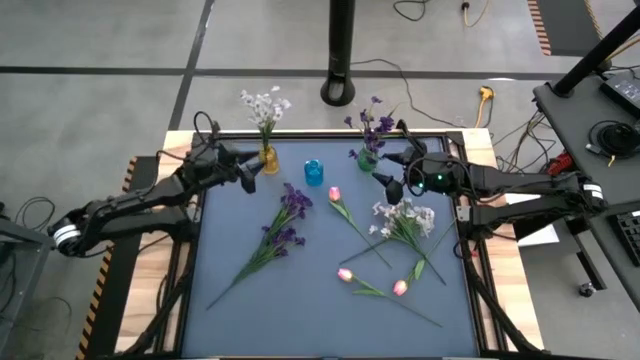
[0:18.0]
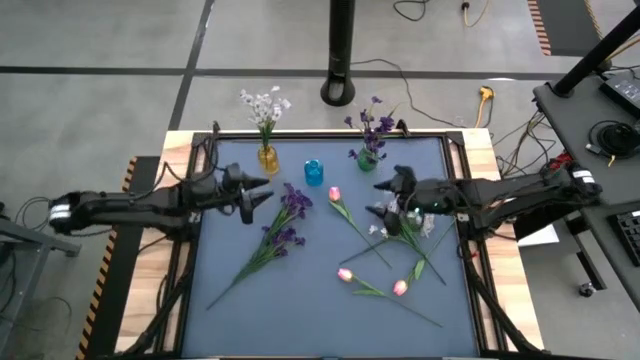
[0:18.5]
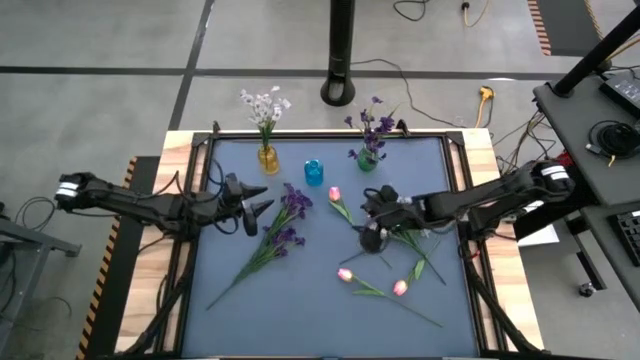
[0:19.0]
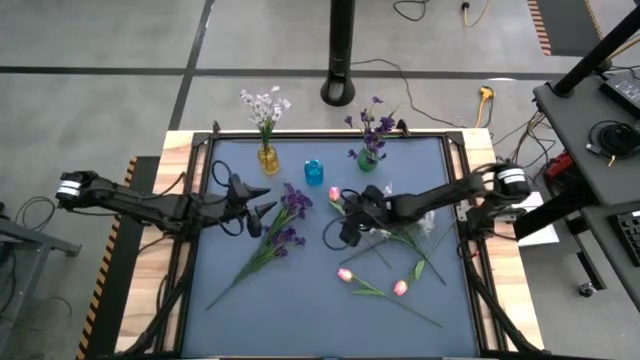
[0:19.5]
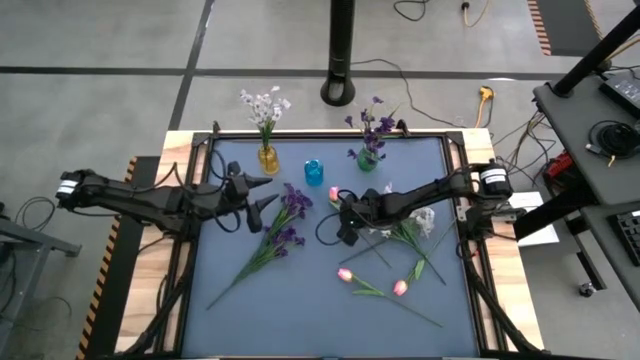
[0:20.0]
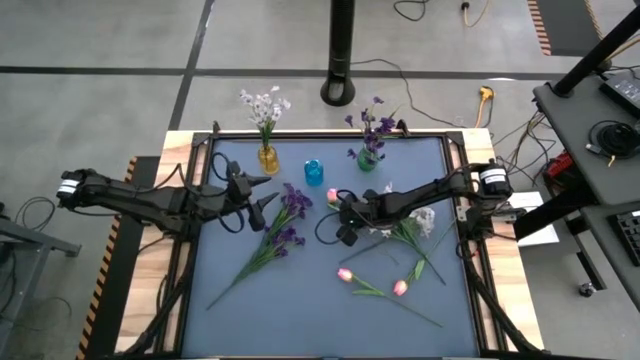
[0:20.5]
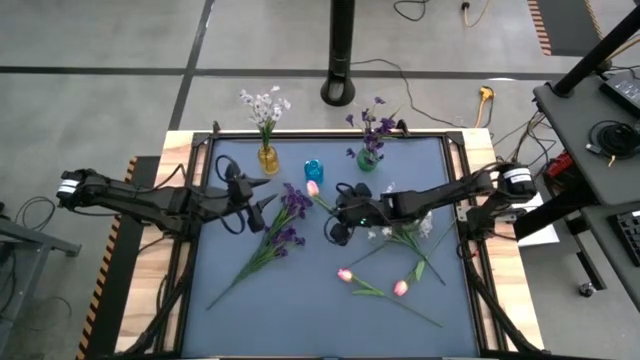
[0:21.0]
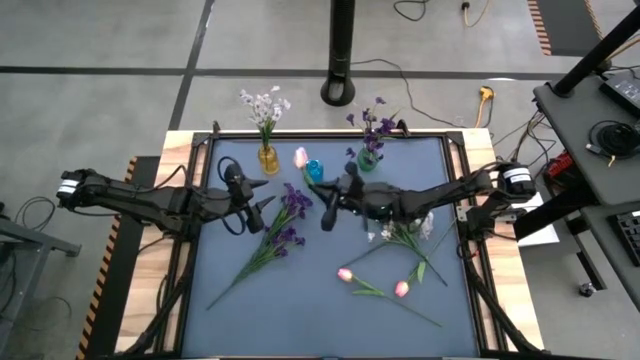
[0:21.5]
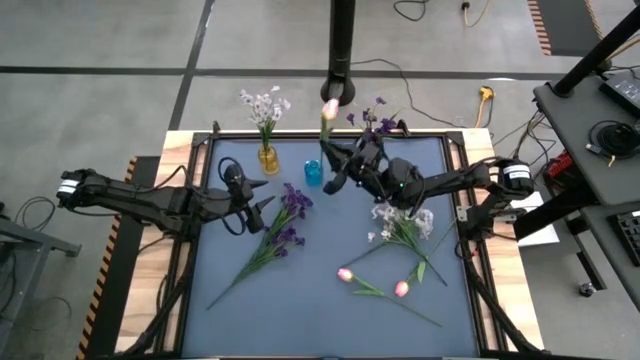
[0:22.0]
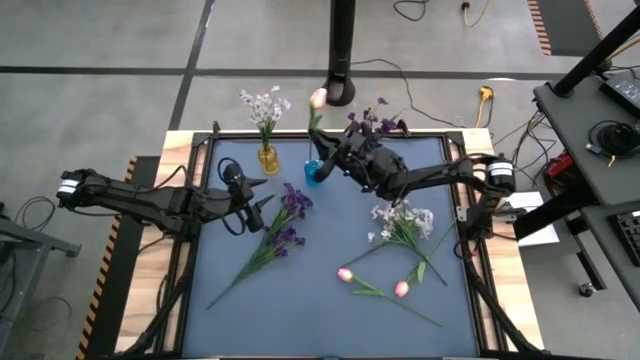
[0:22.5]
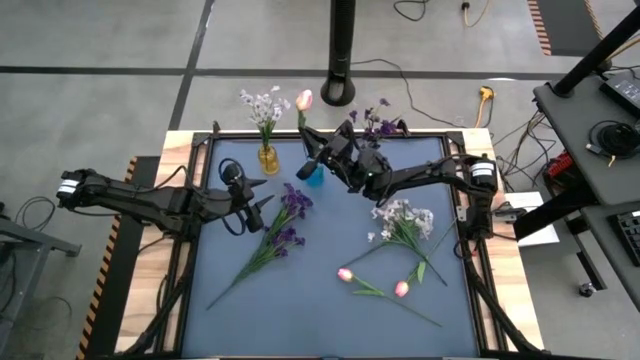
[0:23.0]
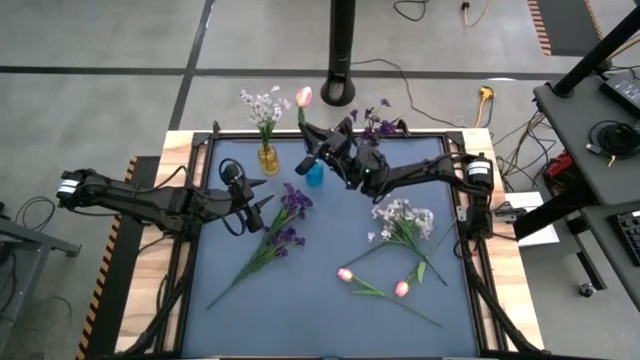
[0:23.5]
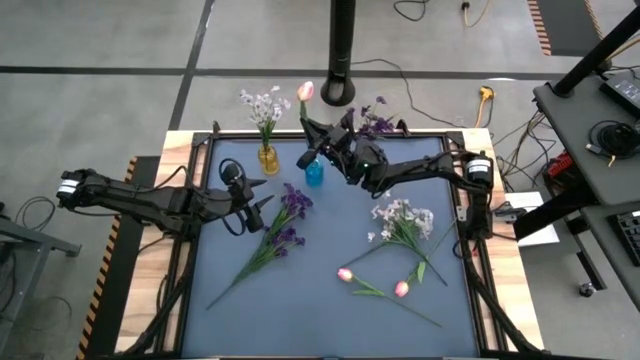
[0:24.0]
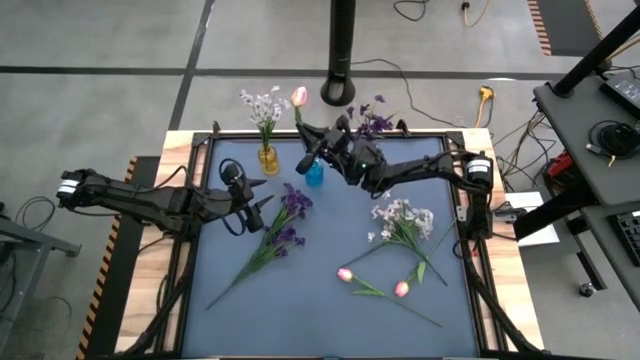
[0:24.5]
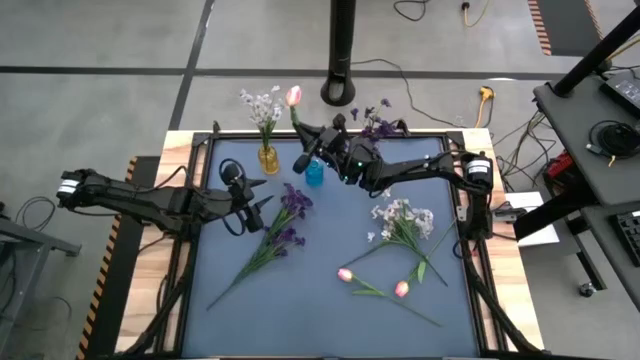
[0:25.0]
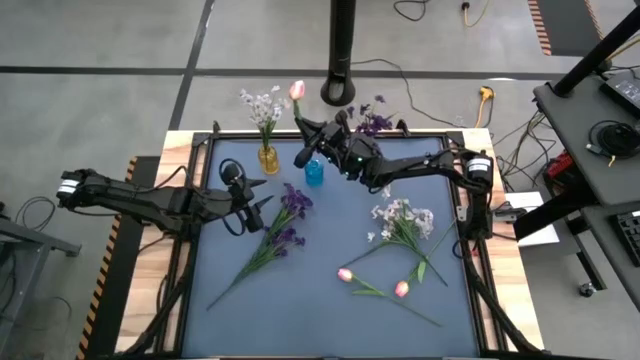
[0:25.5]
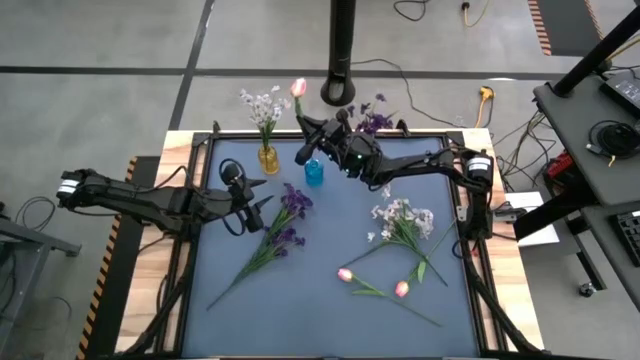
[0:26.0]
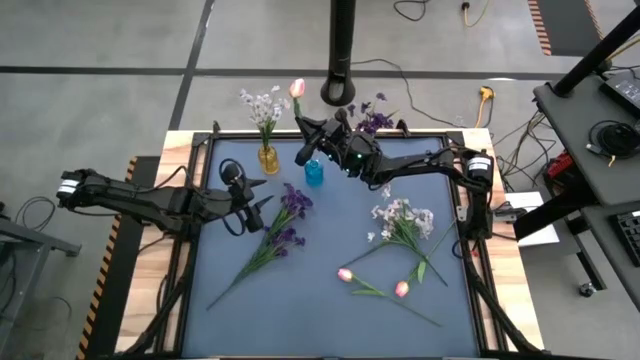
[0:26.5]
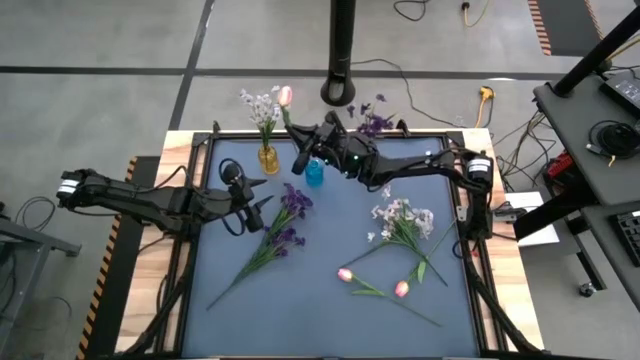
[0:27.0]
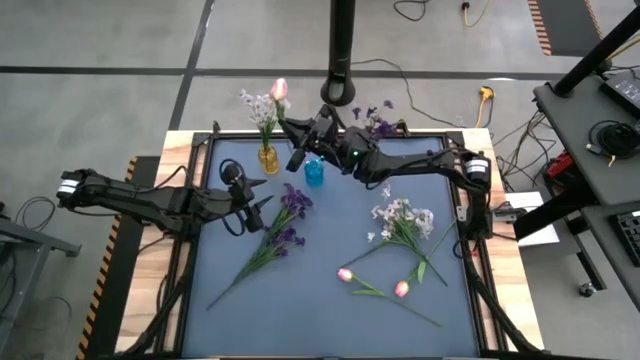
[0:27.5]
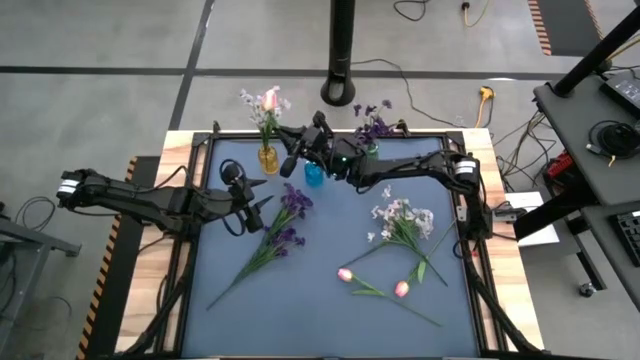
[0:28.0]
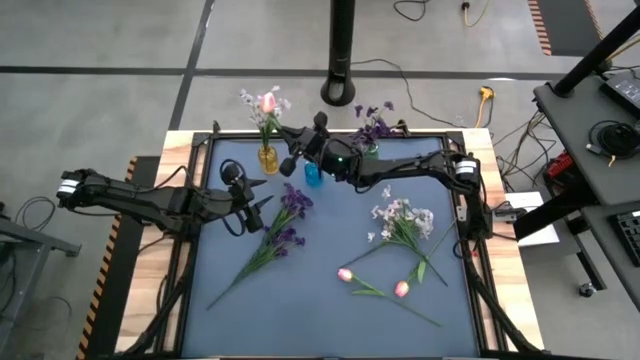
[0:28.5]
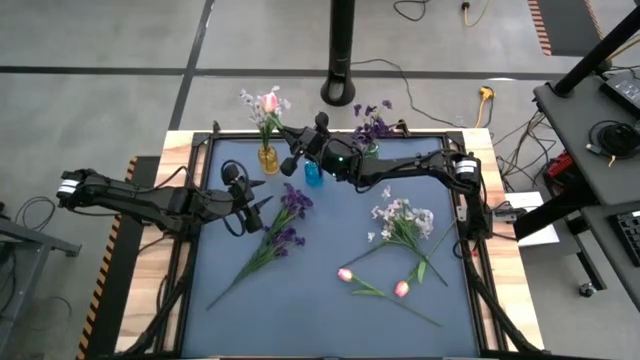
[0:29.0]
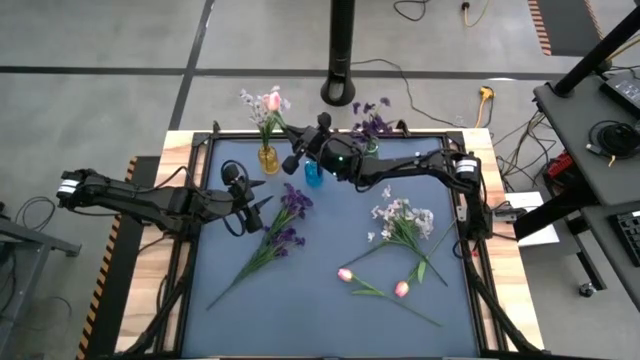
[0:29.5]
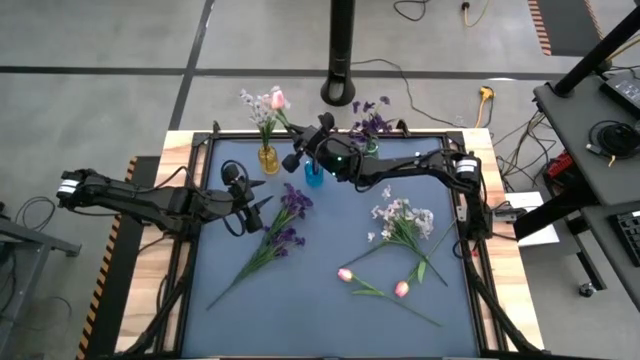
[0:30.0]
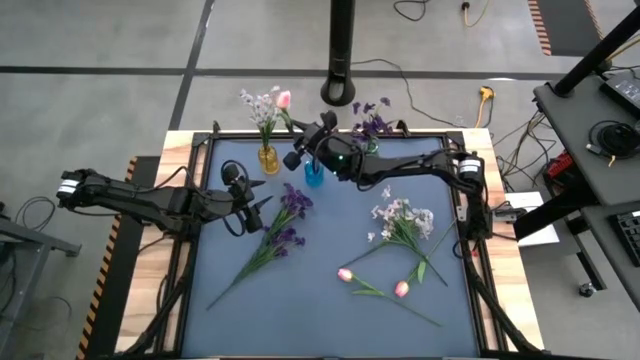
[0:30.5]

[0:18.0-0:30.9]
Task: Sort flowers into vase by color
Put the top pink flower into the blue vase

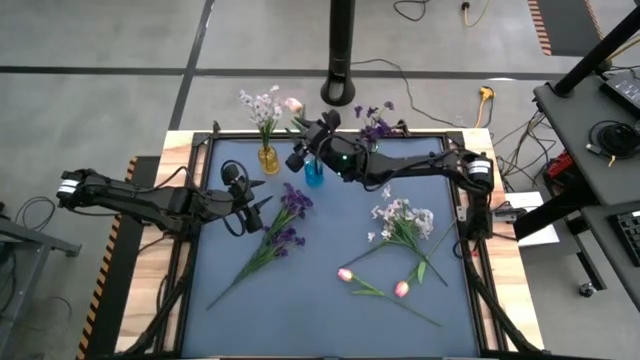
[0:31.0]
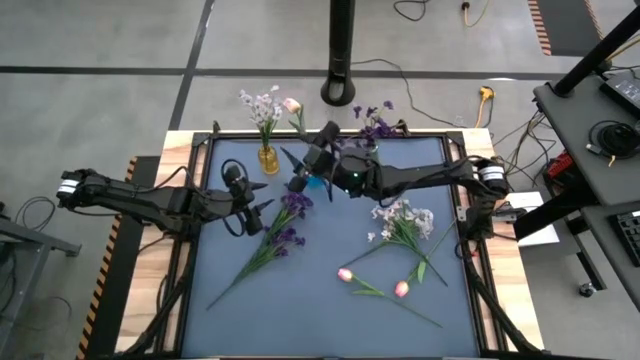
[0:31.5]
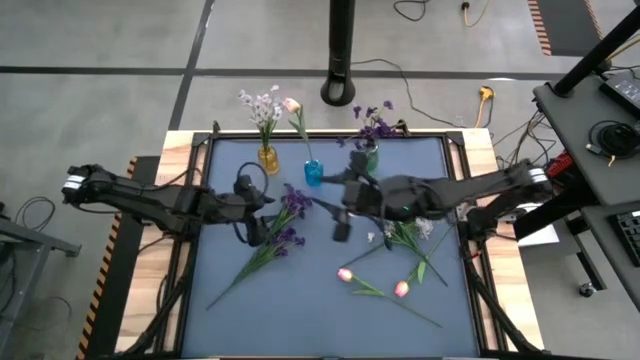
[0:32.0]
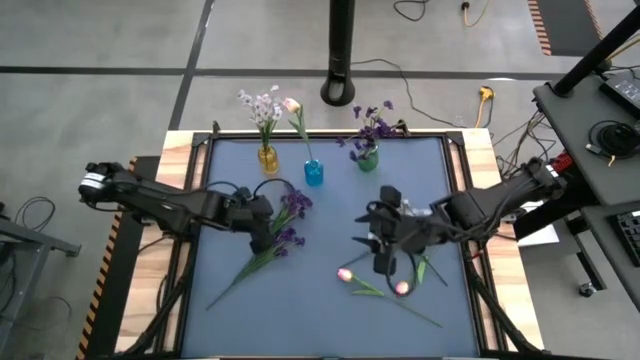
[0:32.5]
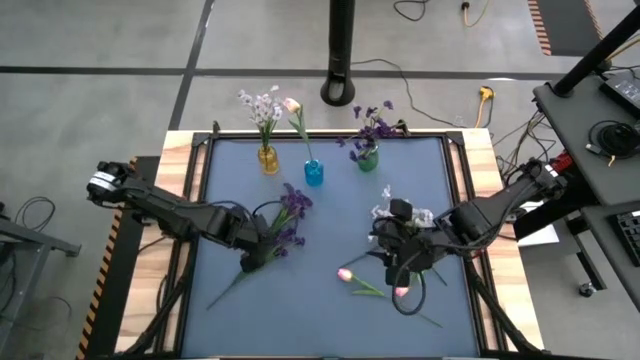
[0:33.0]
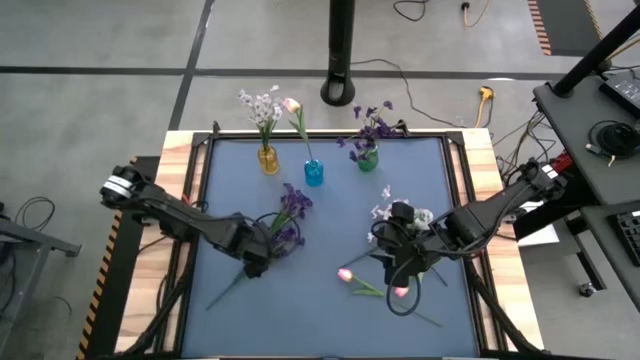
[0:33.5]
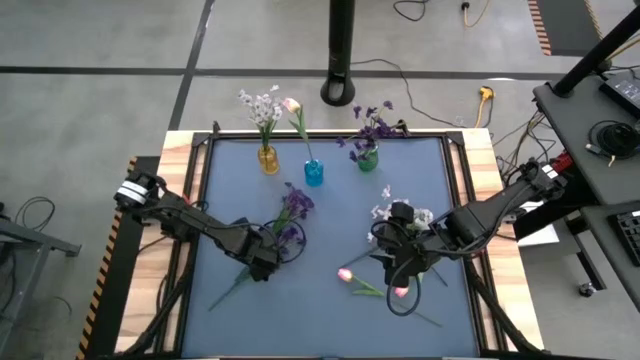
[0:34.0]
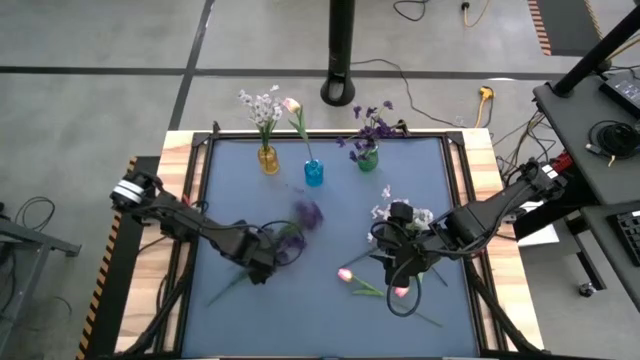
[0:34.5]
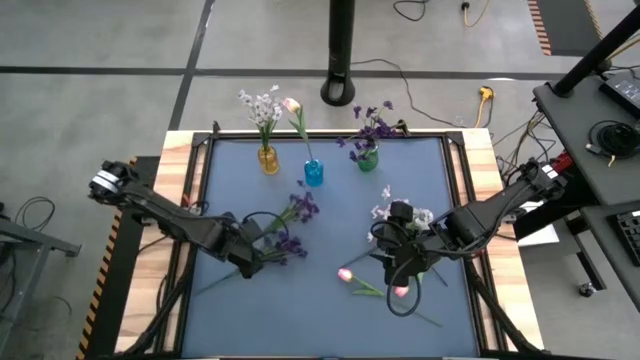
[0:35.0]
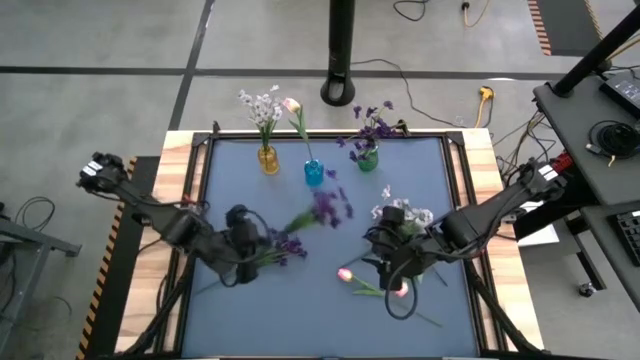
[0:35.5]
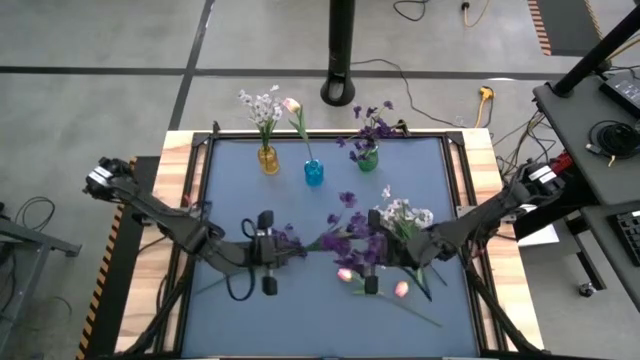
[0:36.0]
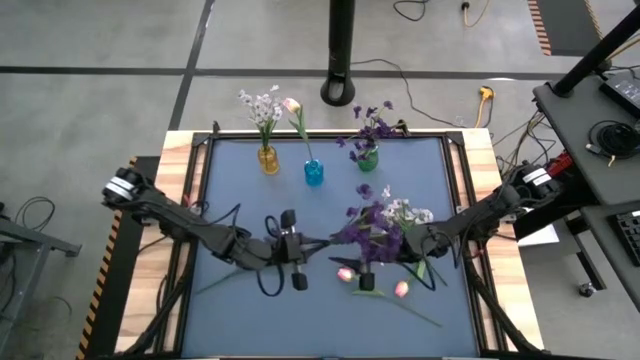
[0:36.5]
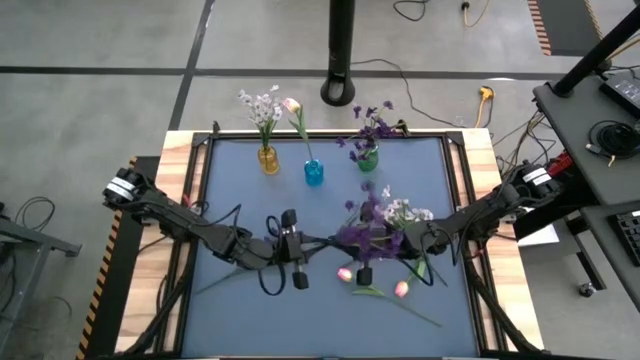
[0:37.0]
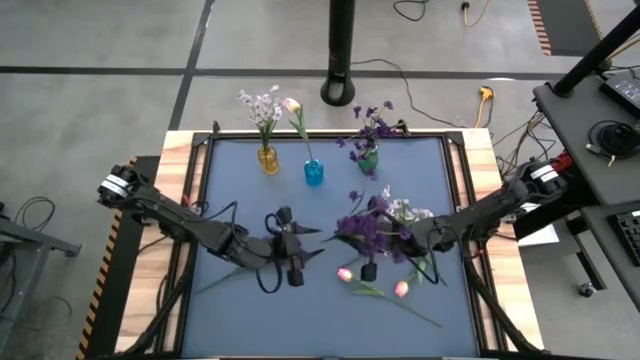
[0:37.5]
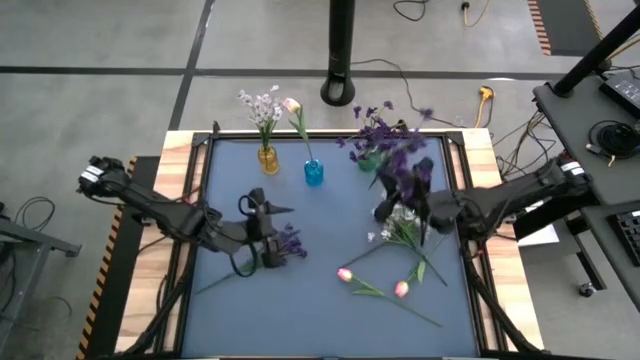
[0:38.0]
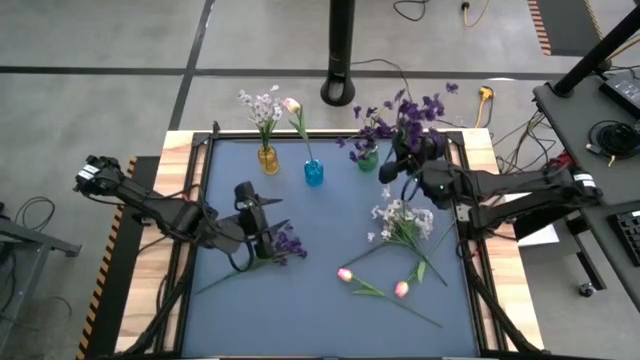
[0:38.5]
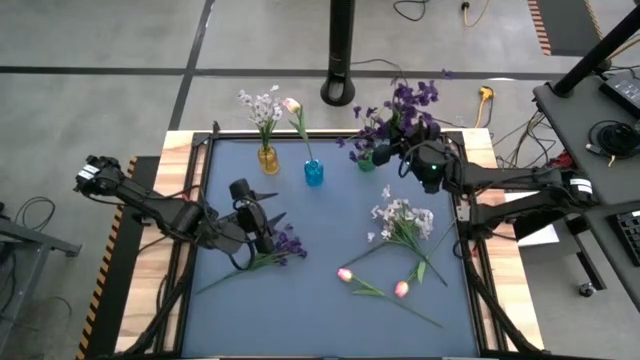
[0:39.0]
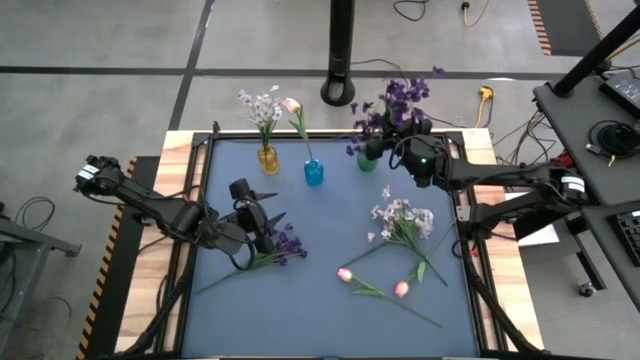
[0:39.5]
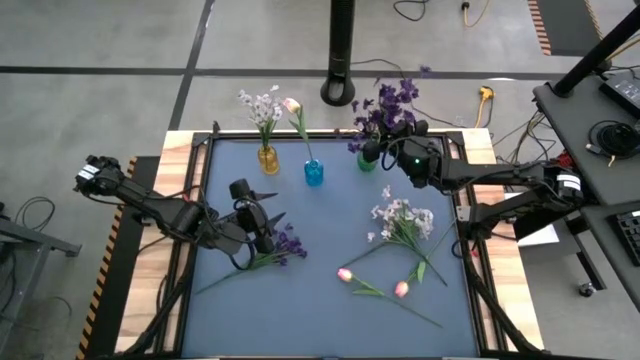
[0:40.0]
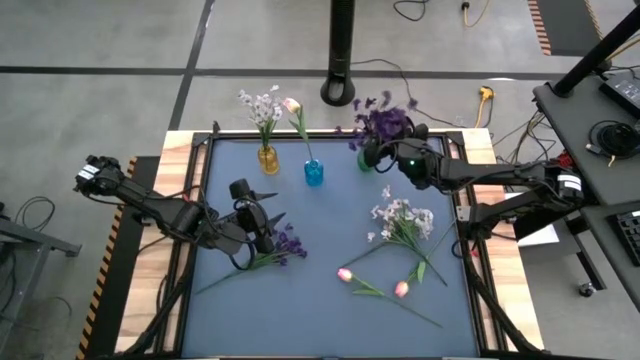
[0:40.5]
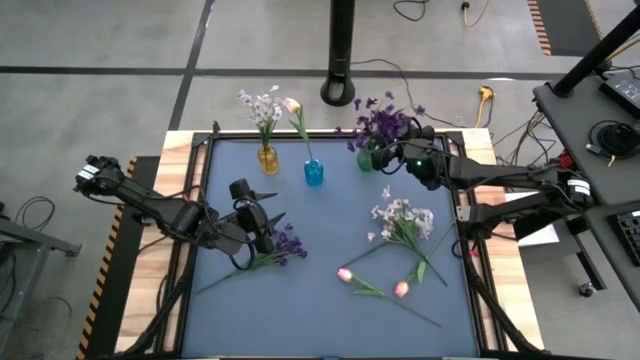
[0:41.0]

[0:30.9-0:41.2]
Put the top purple flower into the green vase
